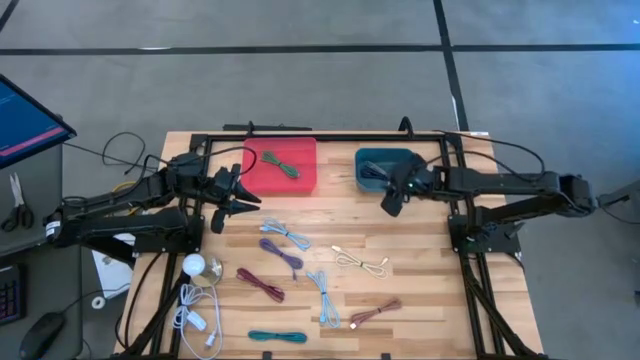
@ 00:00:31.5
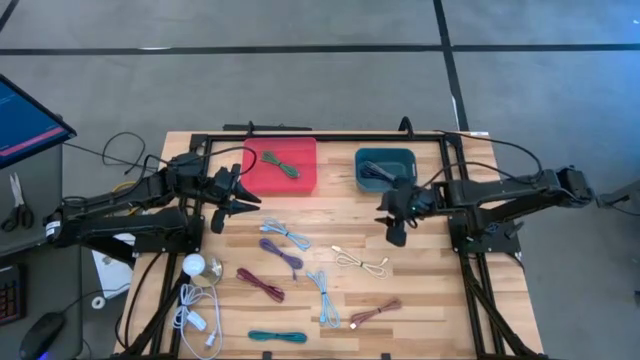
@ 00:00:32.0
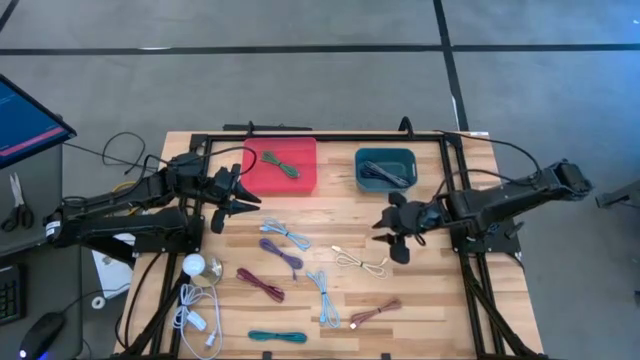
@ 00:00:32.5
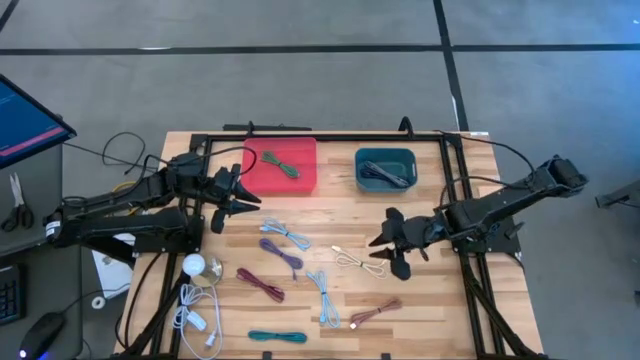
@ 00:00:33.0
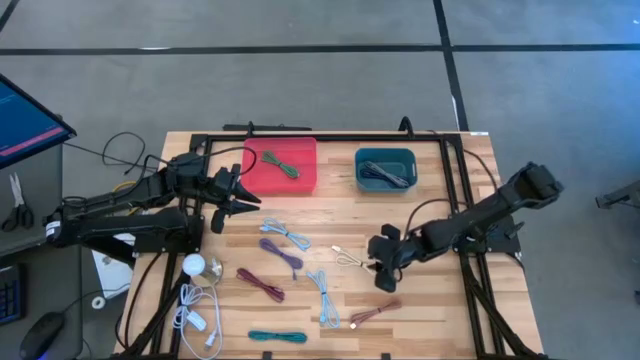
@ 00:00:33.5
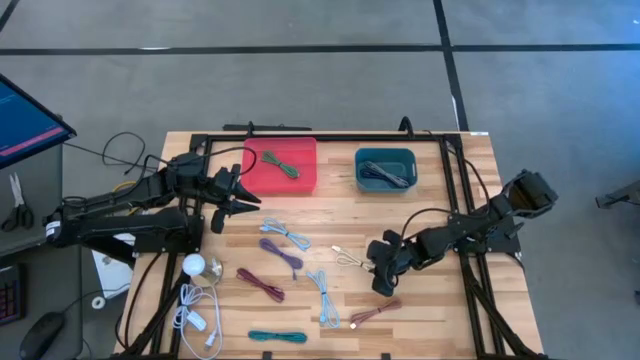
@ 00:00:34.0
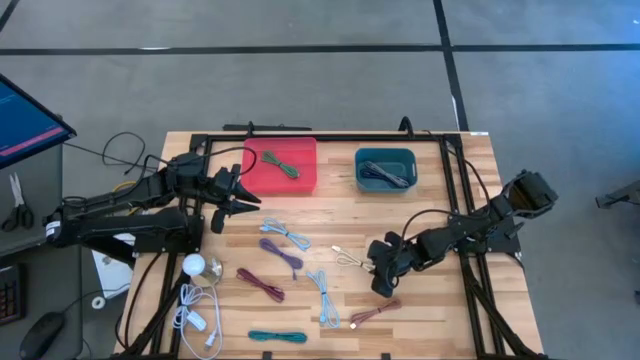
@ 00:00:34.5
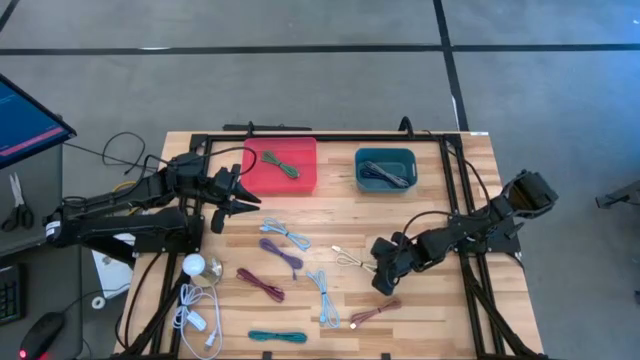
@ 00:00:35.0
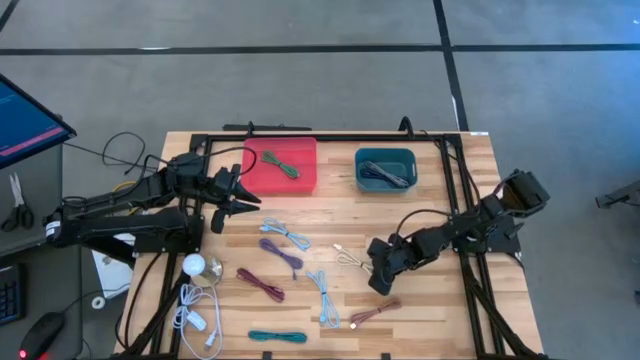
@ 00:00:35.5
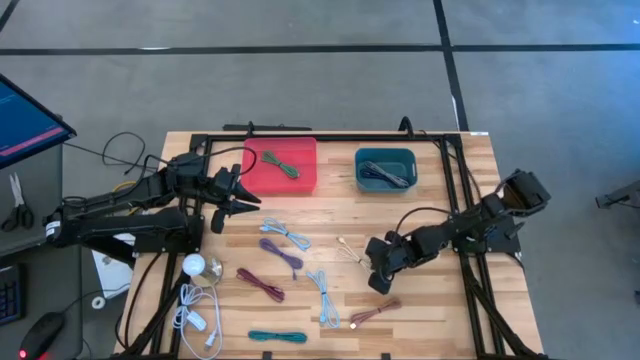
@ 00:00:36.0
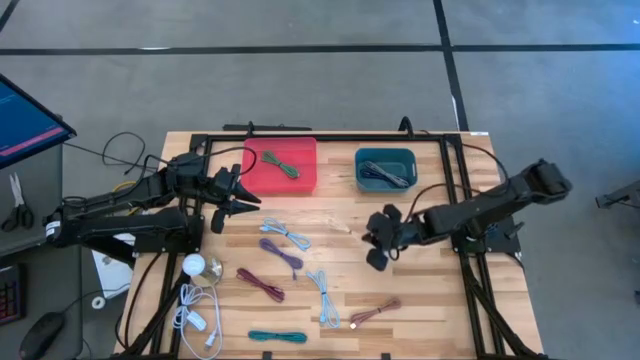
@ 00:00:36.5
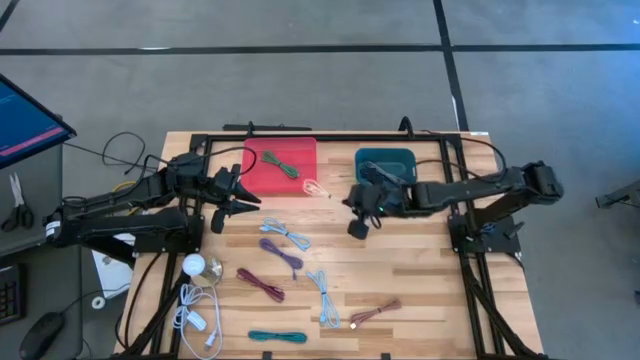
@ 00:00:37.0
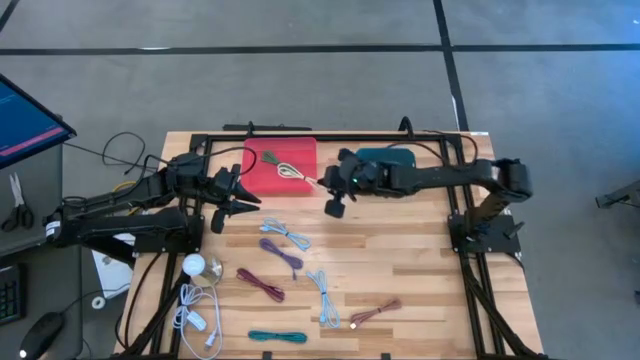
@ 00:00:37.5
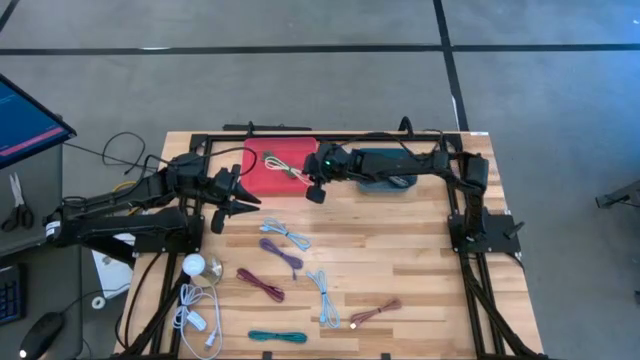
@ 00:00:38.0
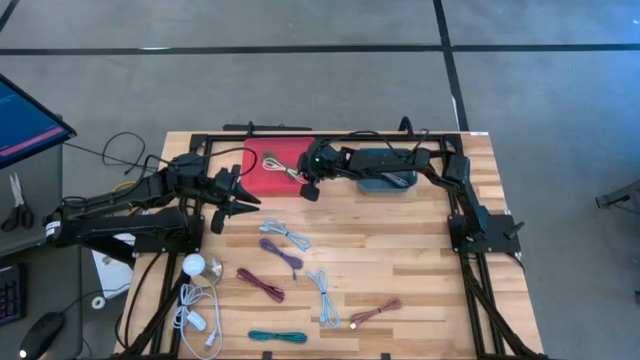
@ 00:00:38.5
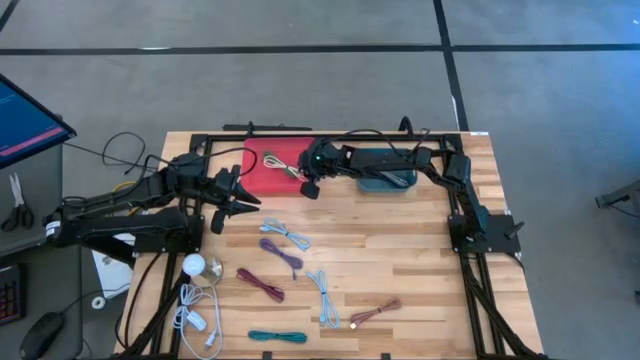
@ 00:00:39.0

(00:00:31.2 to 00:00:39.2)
Task: Pick & Place USB Port
Put the light brown charger cable into the red bin

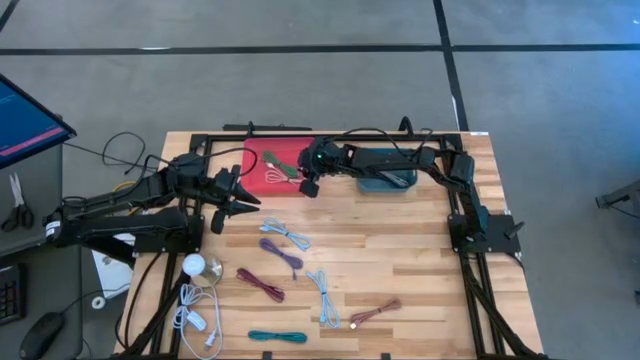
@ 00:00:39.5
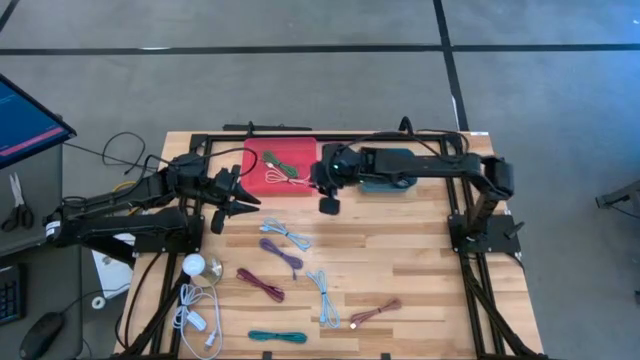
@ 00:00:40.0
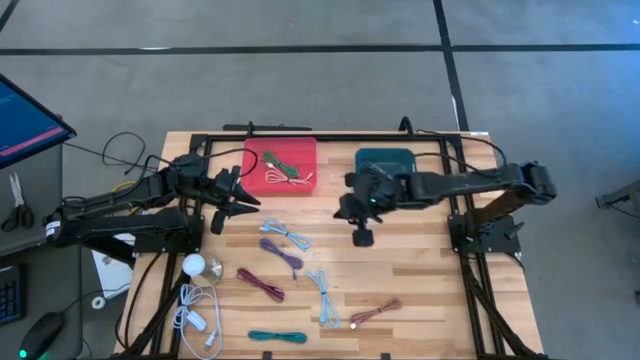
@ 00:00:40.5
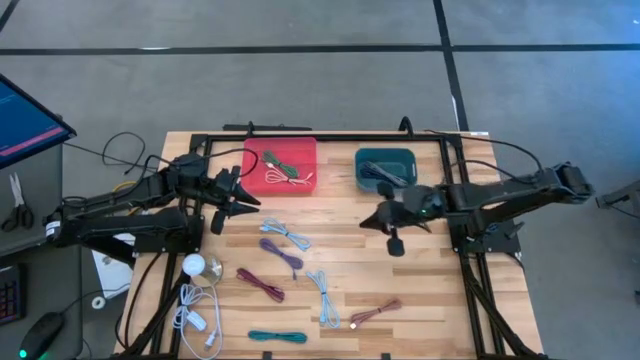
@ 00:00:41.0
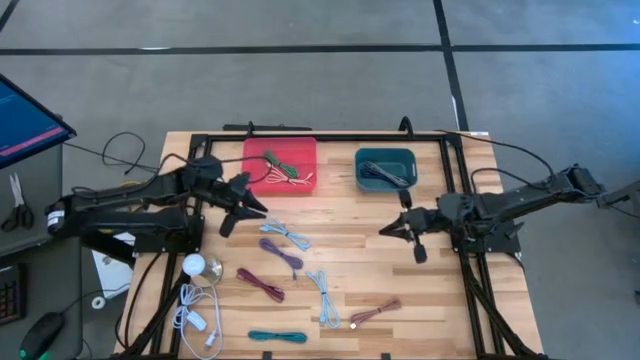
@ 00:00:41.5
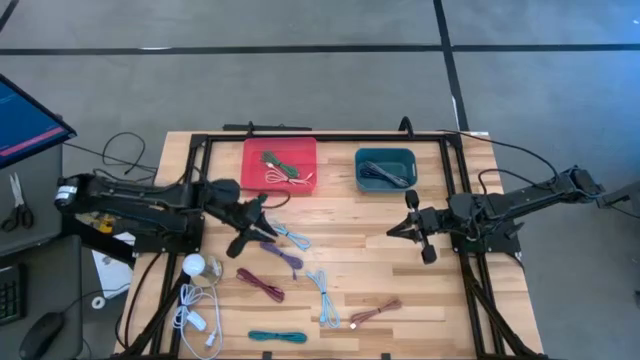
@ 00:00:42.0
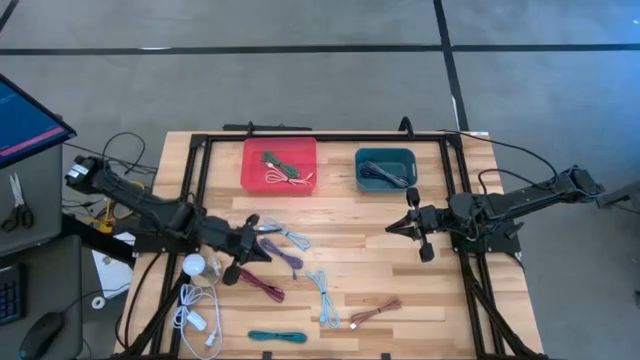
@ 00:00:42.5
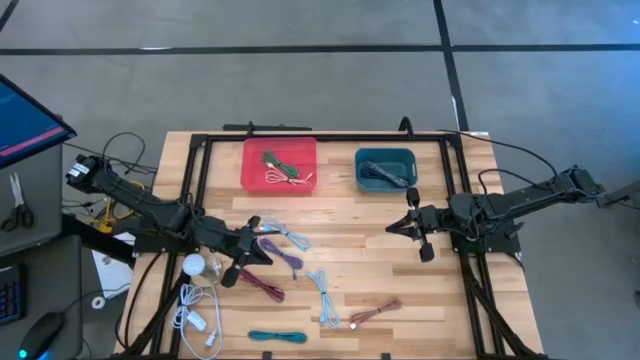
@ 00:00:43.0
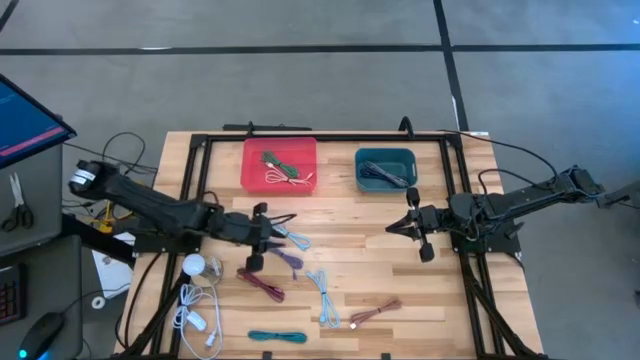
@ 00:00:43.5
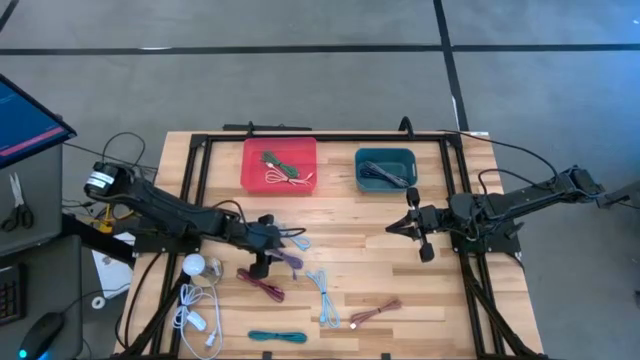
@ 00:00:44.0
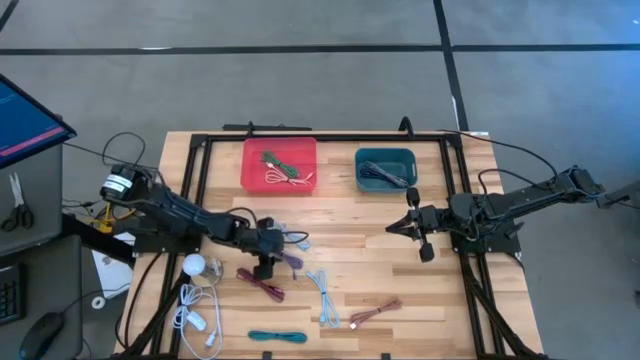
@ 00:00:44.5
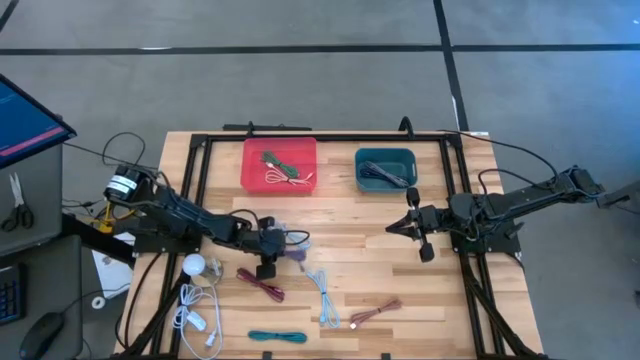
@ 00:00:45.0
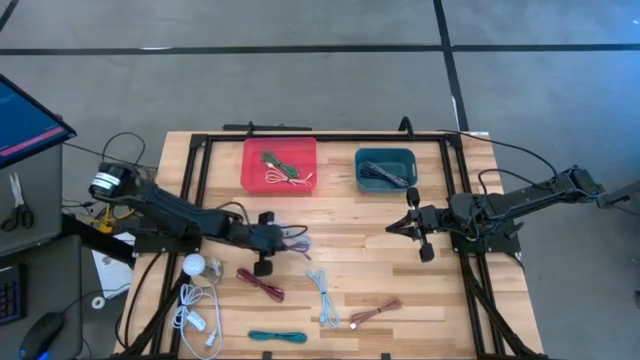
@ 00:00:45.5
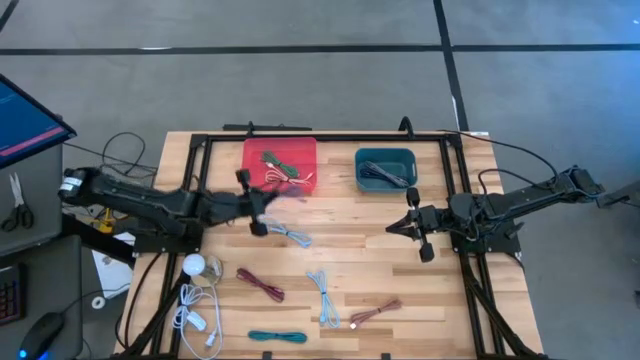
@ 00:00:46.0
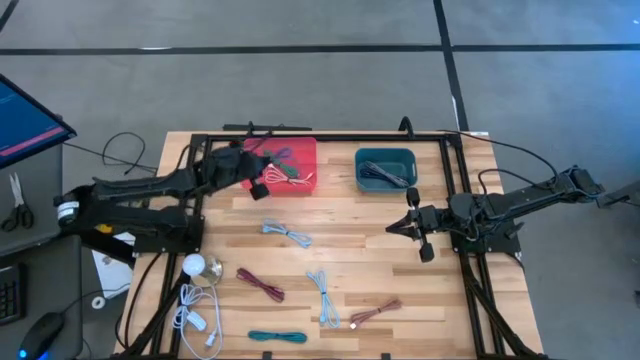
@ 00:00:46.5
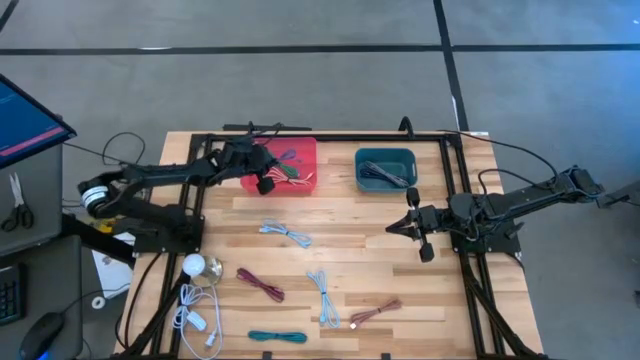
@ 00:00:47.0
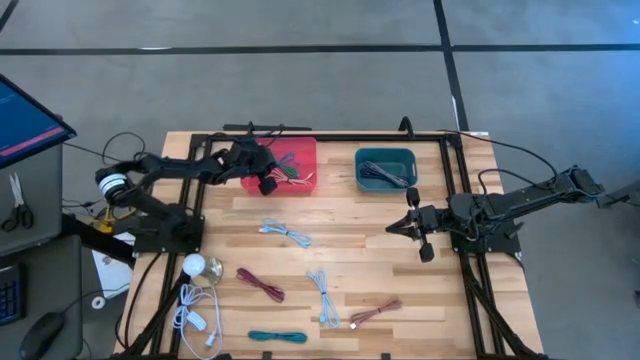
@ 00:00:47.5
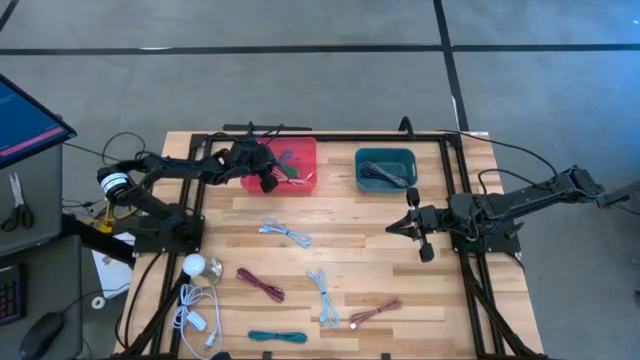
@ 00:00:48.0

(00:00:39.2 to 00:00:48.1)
Put the purple charger cable into the red bin

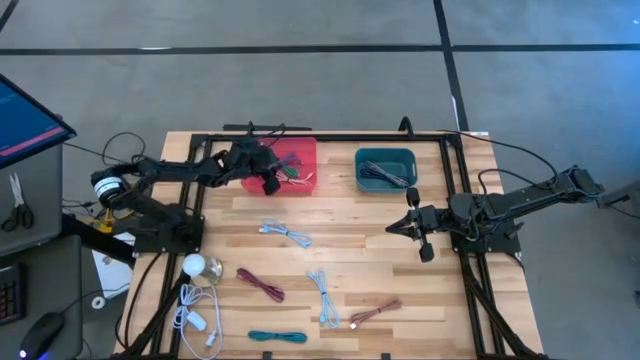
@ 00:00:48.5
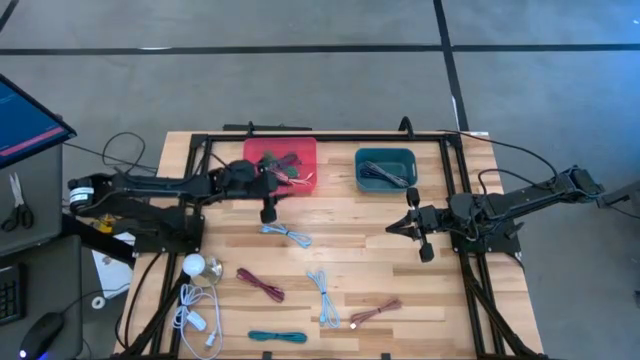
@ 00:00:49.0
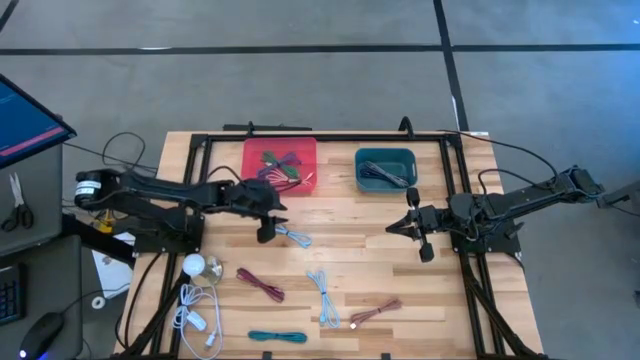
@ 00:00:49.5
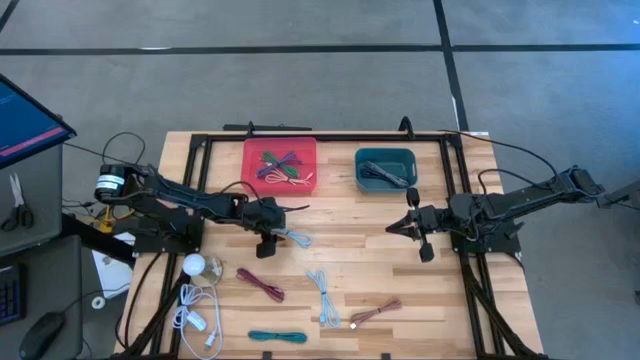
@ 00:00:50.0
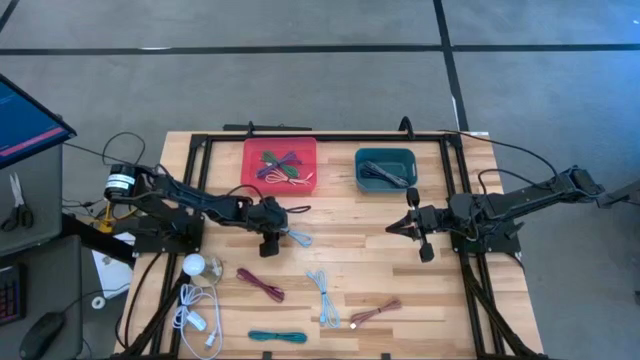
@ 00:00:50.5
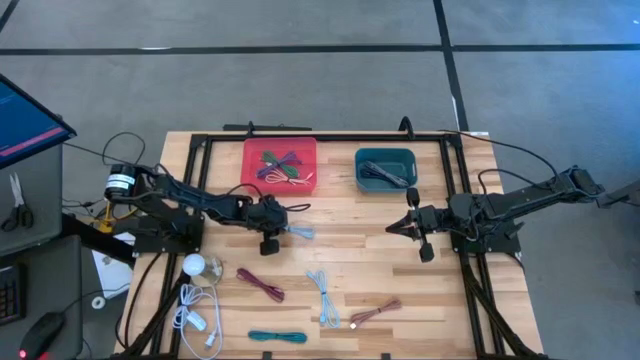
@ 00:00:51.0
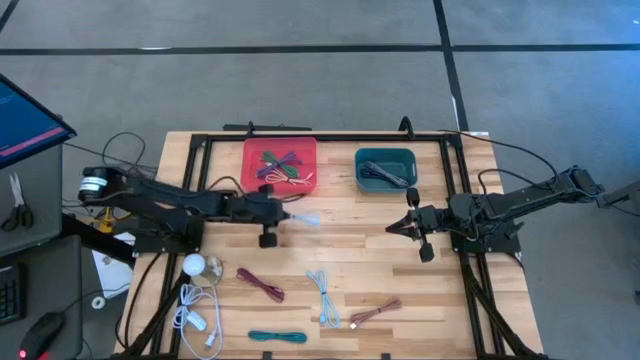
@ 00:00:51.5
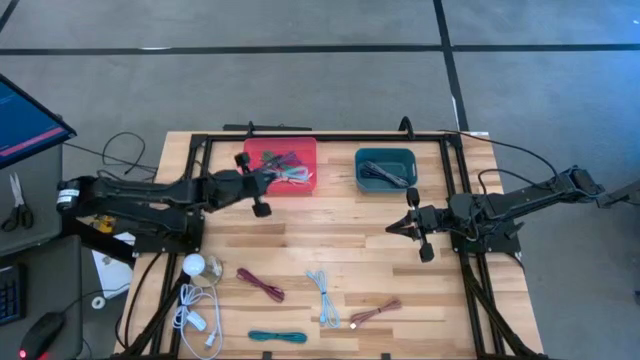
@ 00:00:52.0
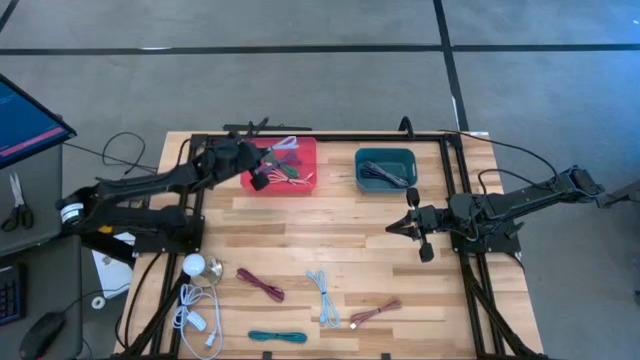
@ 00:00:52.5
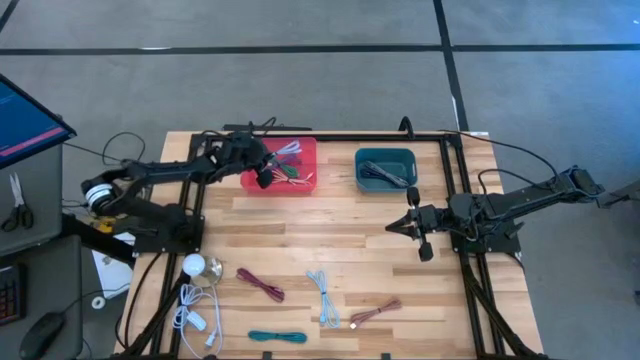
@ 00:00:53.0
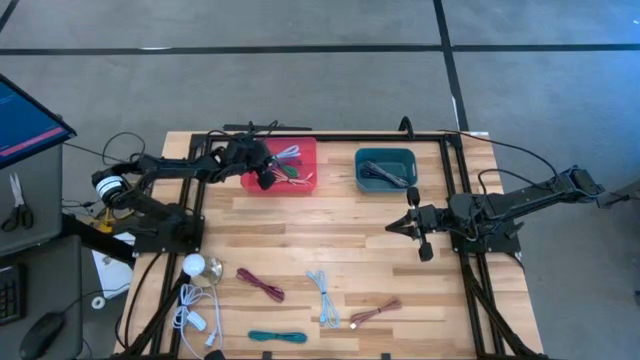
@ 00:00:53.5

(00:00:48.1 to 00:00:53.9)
Put the top white charger cable into the red bin
